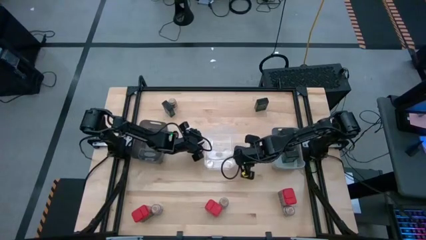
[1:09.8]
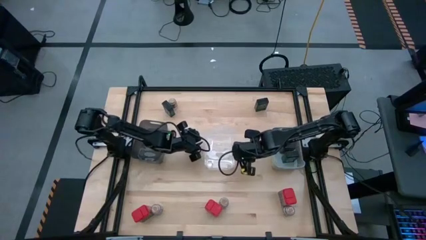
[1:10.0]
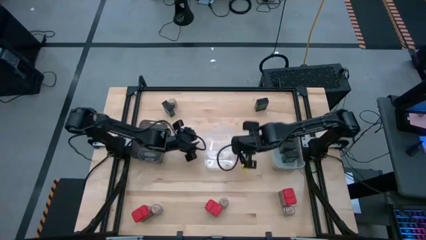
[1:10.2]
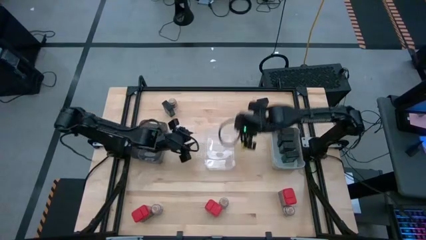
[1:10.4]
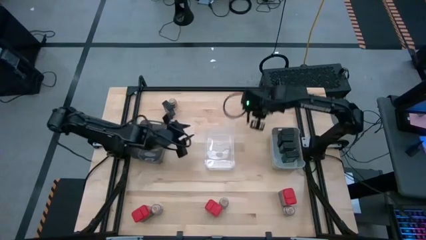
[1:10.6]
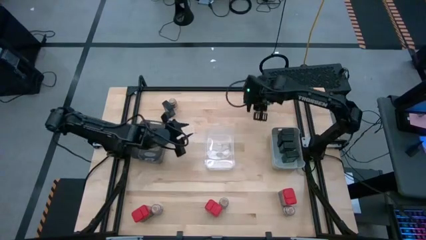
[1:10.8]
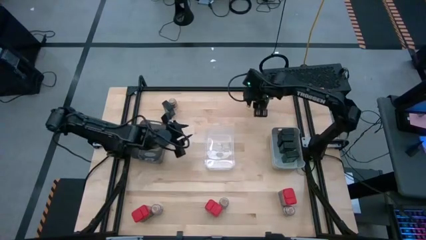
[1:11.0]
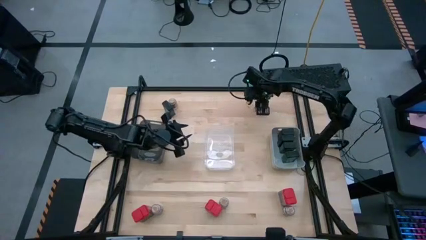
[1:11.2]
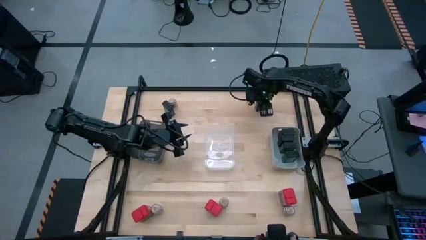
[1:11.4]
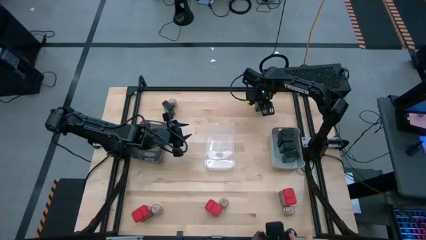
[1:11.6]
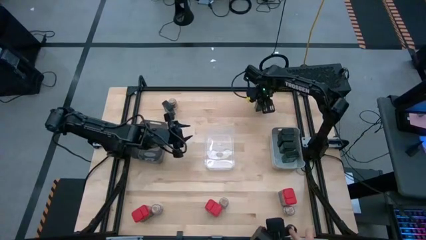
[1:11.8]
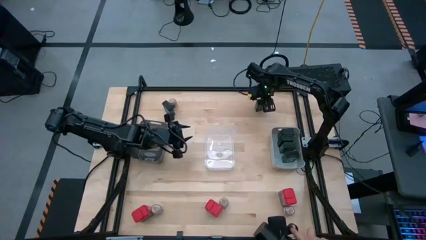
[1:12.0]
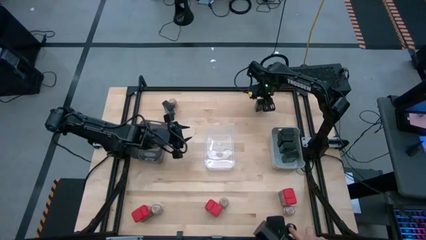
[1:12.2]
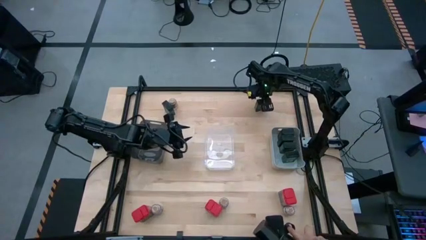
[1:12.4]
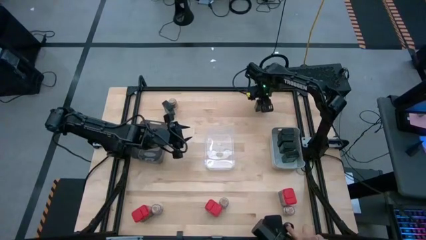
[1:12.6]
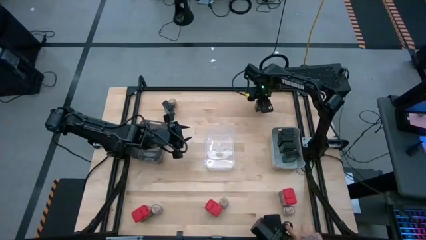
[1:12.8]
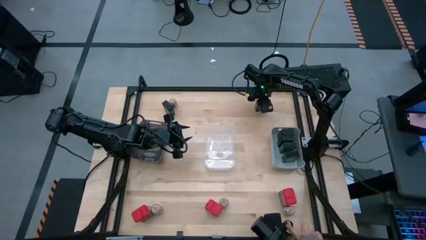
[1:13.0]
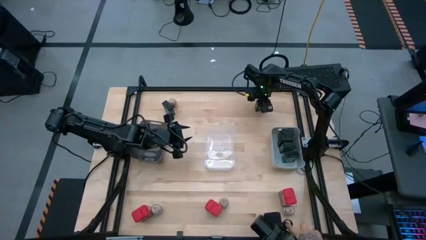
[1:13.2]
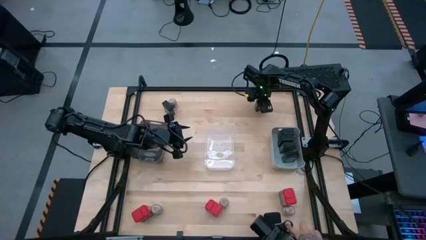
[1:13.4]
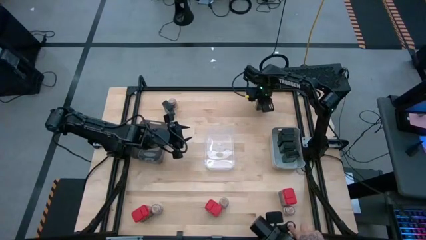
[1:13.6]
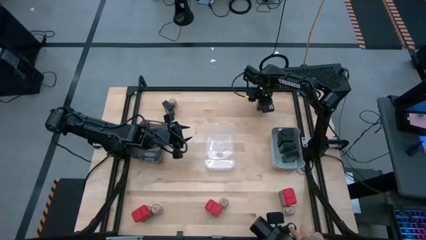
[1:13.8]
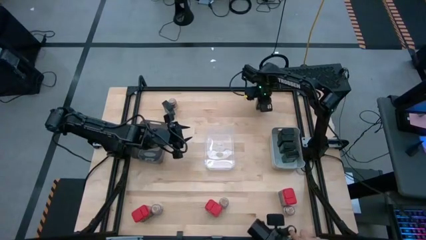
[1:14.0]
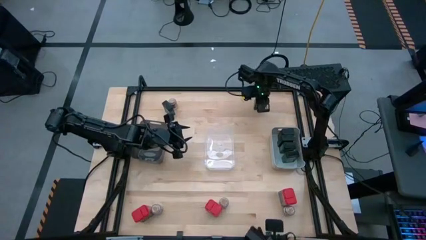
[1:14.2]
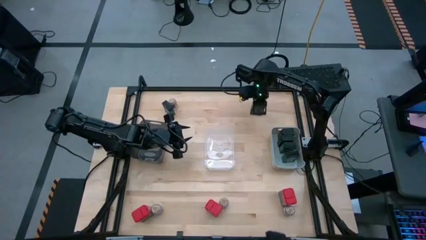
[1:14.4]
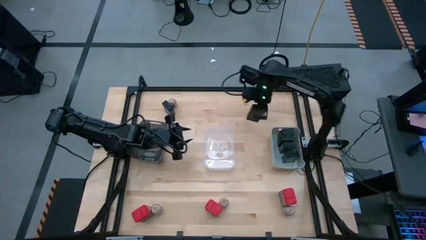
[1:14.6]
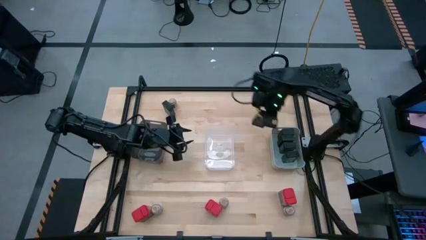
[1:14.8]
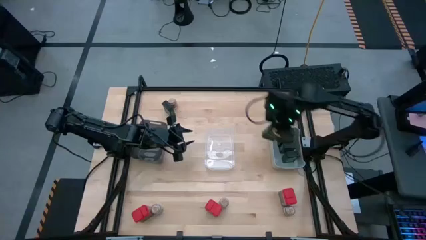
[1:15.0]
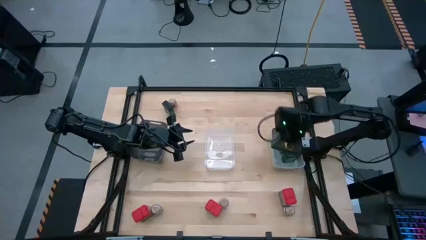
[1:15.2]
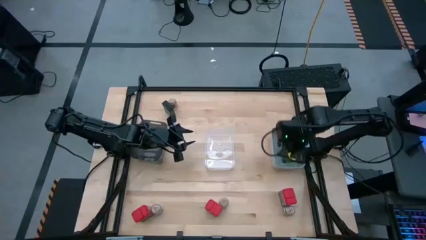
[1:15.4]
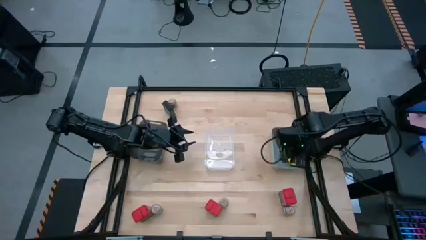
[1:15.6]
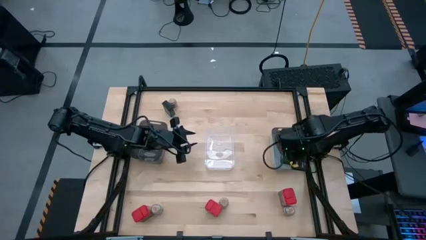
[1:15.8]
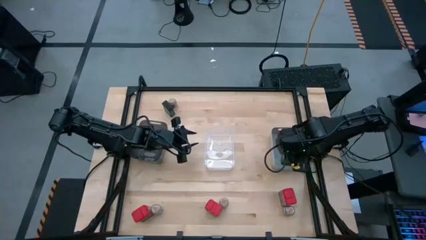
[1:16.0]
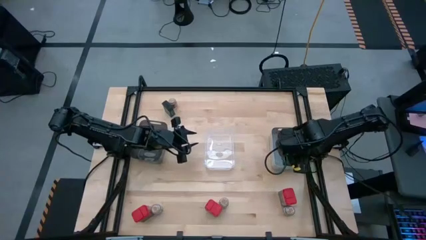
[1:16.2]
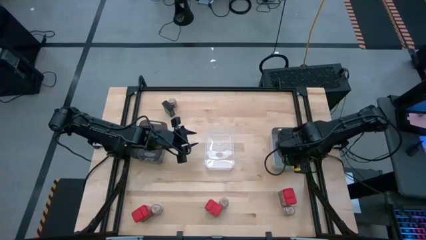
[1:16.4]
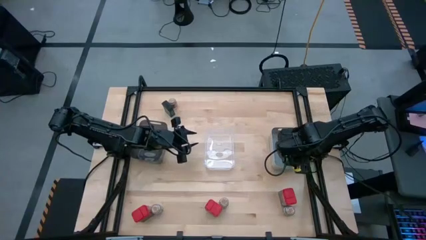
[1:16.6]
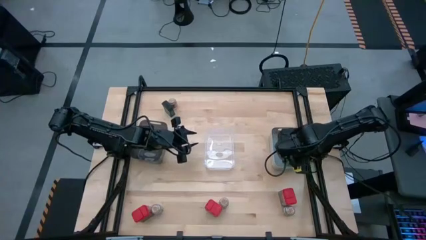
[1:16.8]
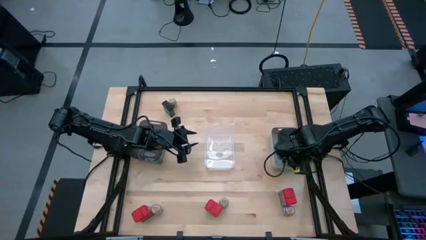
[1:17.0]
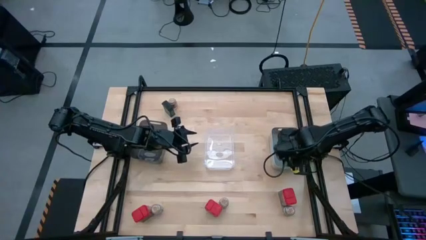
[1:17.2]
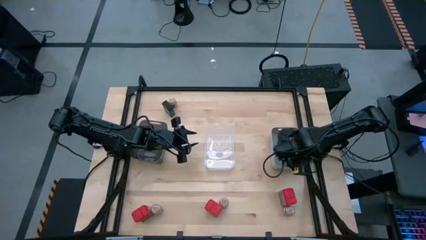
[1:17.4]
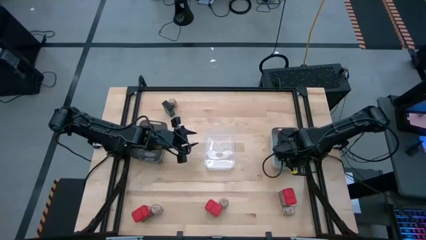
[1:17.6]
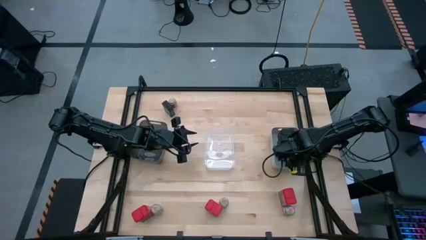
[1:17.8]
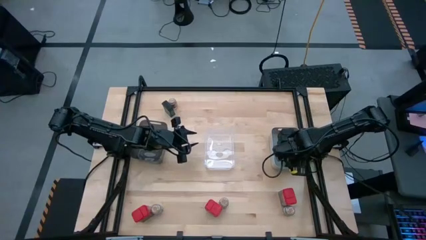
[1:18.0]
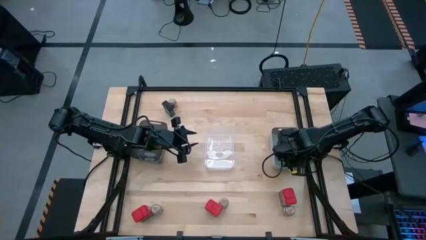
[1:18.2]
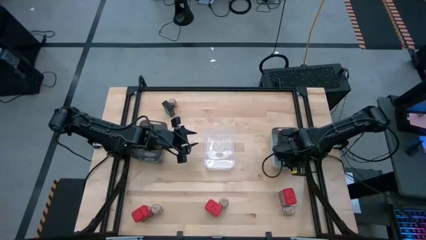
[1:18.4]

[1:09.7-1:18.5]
Task: Sort spices by type
Put the black seasoning can into the gray bin

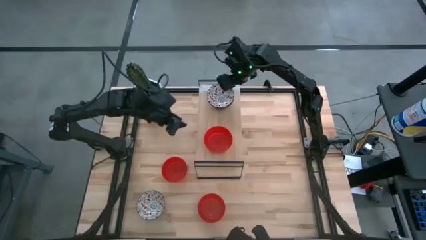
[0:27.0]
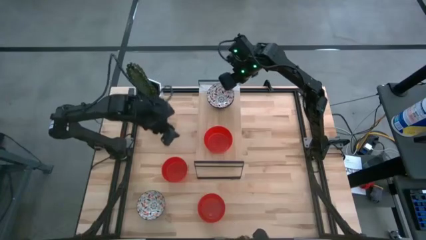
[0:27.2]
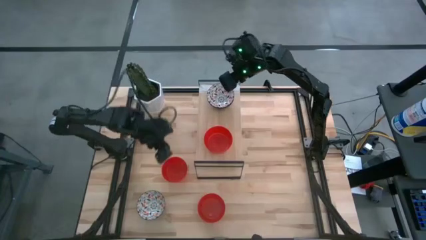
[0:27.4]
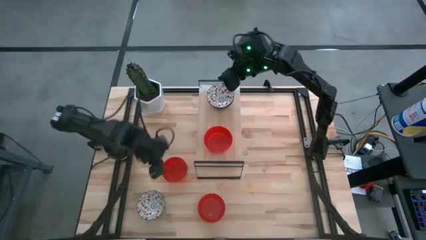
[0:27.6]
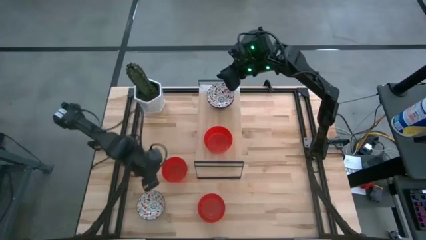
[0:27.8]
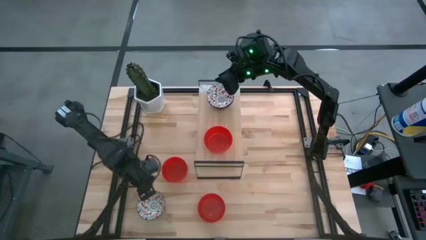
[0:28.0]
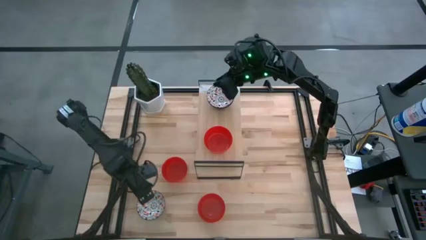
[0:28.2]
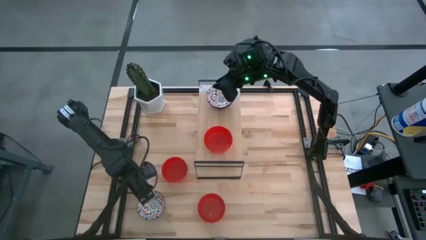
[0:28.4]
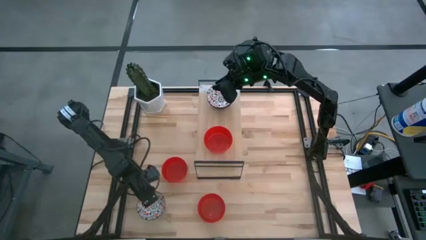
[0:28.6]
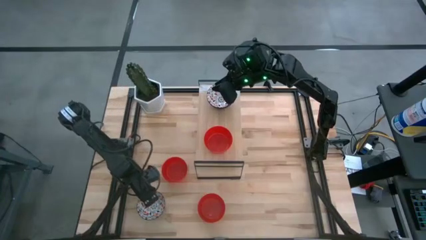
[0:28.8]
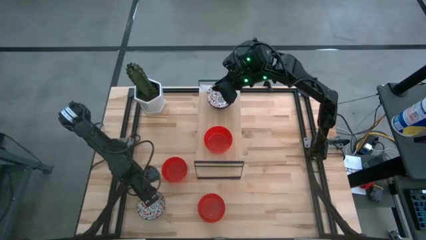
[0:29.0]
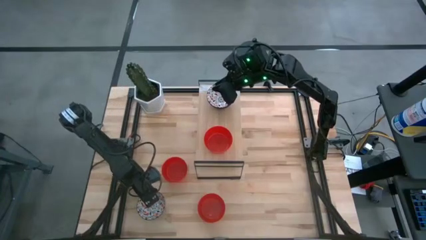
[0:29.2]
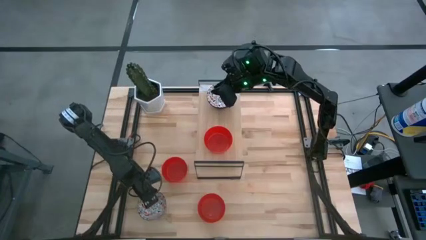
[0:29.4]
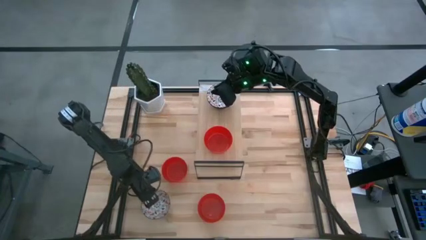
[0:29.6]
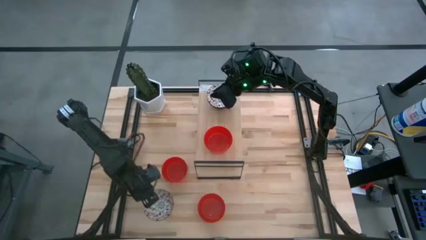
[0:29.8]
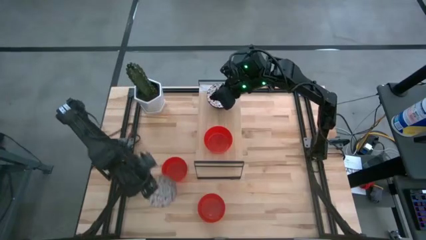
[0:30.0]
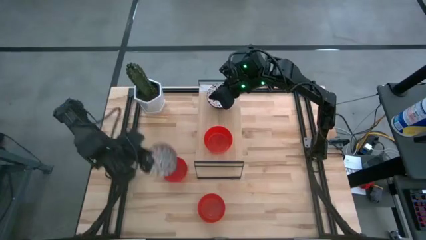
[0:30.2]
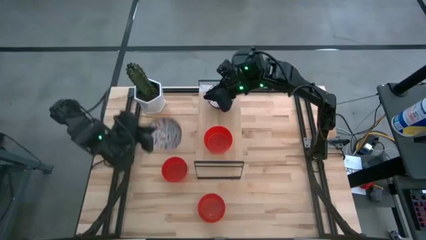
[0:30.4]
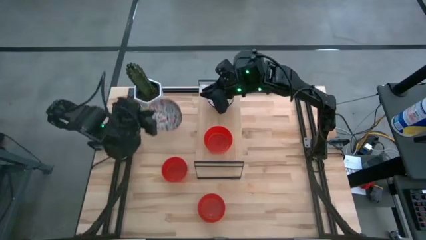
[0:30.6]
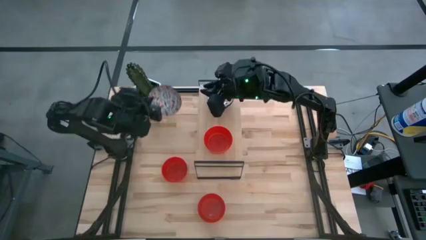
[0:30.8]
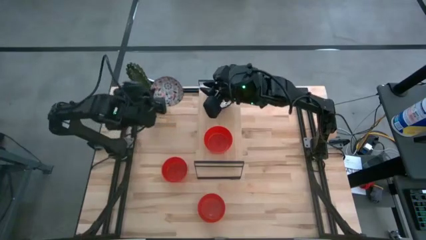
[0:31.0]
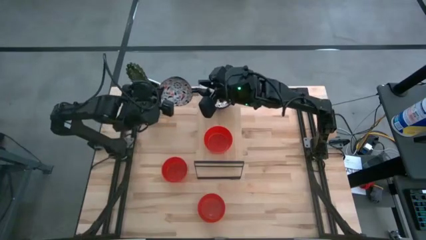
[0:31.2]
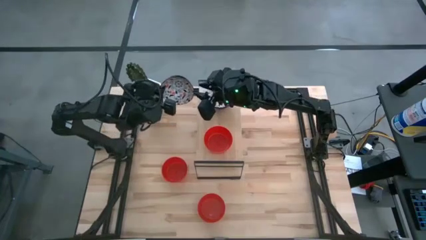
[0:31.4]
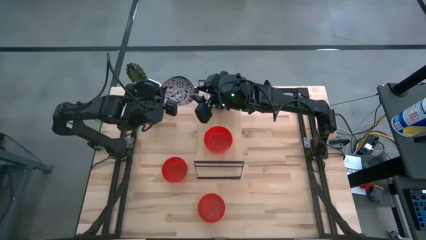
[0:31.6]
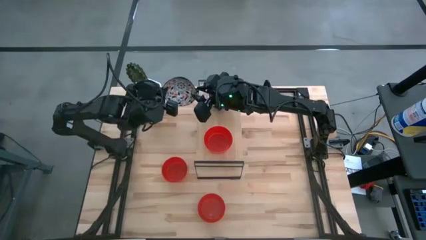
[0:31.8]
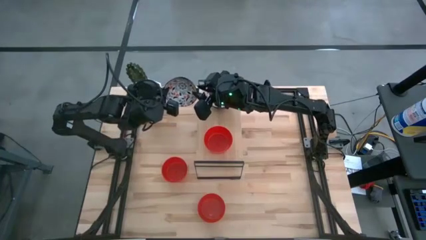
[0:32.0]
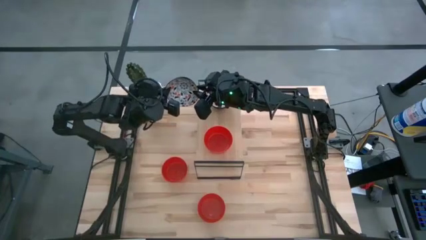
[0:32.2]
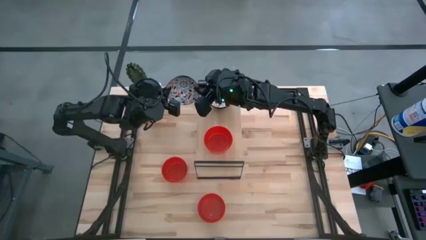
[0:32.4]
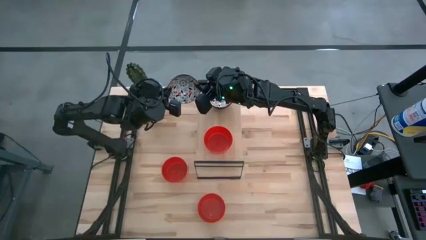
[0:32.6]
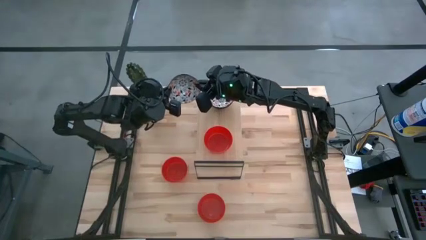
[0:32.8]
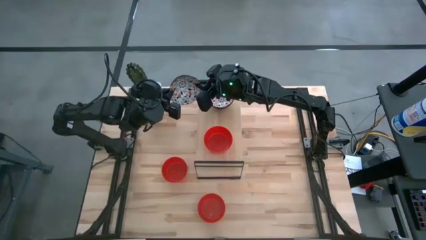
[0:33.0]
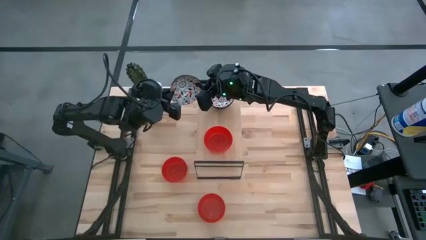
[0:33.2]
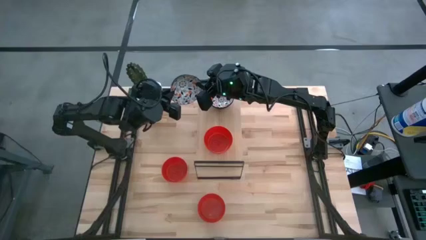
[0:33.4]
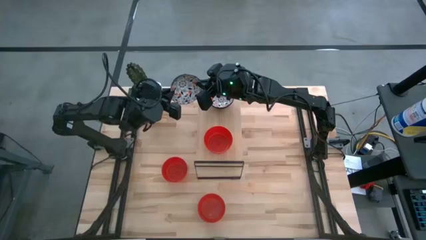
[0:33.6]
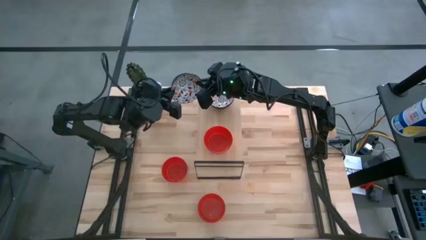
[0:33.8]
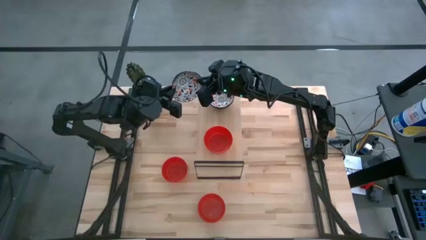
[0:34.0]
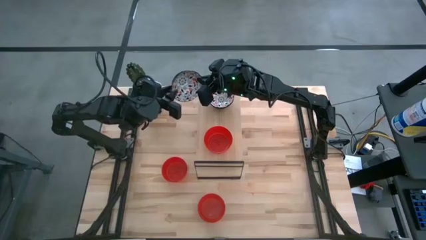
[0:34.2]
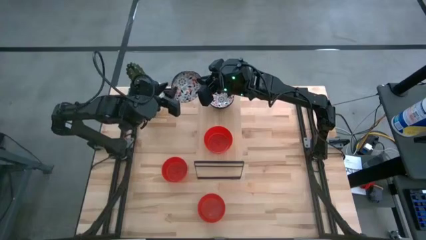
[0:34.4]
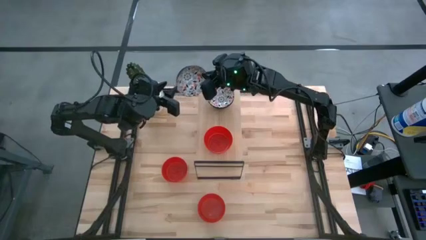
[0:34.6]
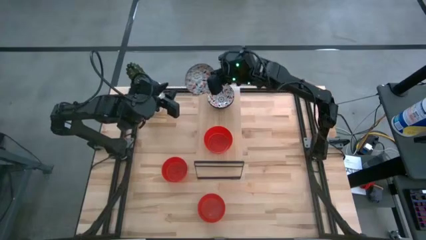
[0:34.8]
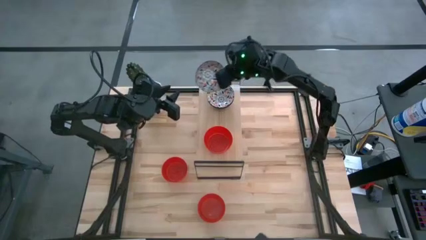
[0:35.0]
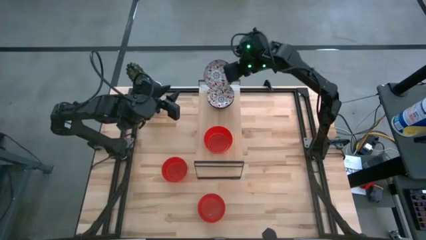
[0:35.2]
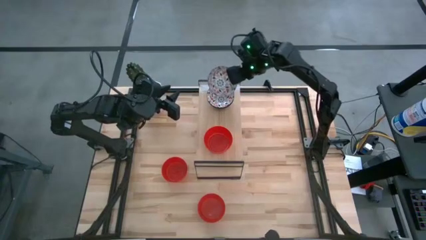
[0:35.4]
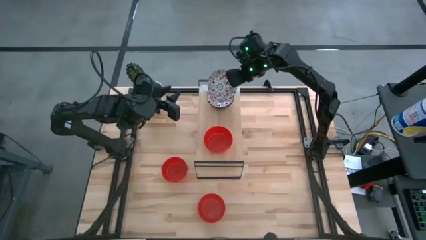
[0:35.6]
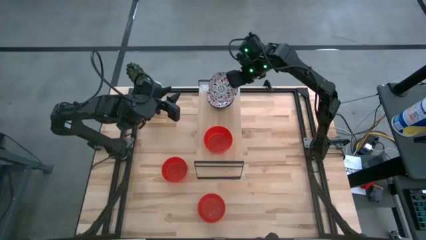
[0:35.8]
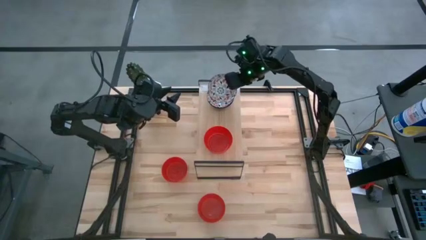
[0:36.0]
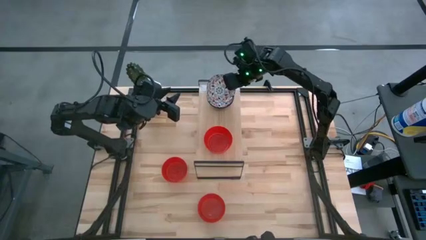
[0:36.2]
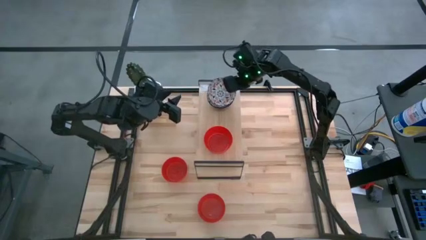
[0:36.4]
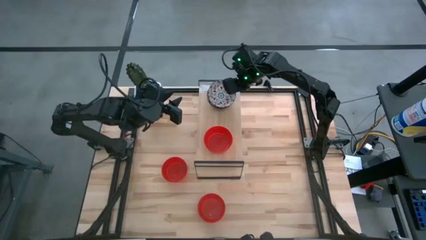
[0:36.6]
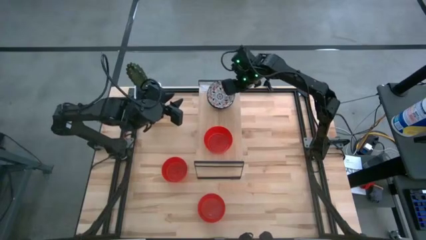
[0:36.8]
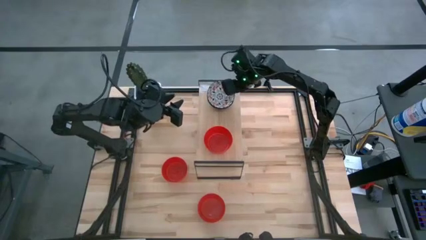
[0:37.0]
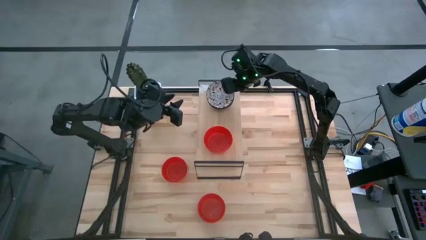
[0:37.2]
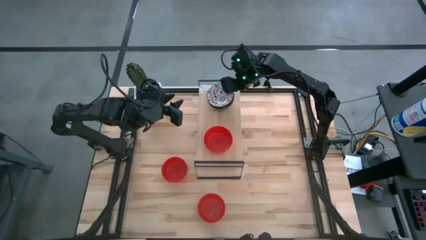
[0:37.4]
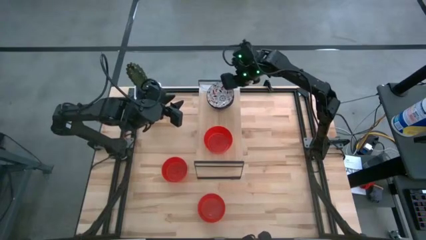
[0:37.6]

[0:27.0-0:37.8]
Task: Pick & Place Mini bowls
Stack the white patterned bowl on top of the other white patterned bowls on the shelf
